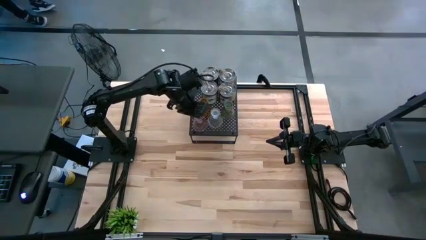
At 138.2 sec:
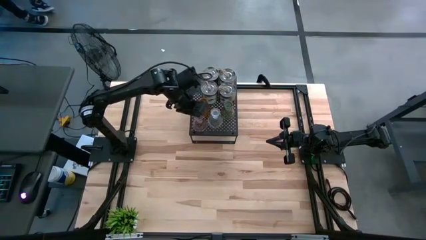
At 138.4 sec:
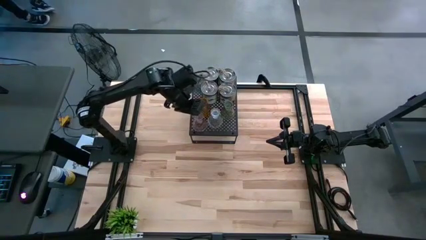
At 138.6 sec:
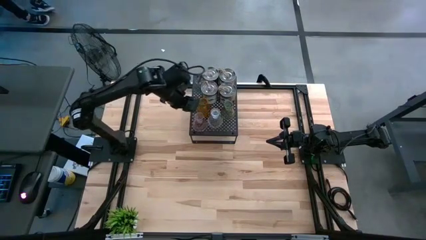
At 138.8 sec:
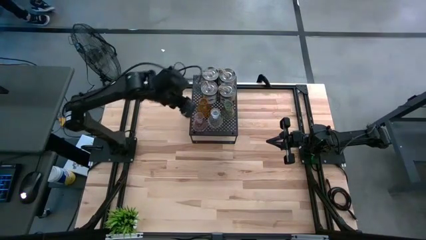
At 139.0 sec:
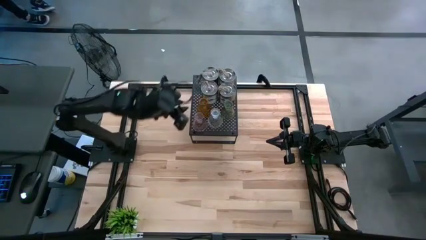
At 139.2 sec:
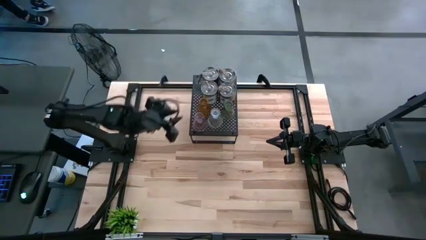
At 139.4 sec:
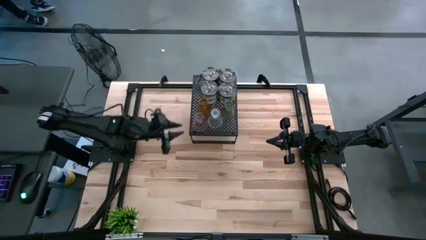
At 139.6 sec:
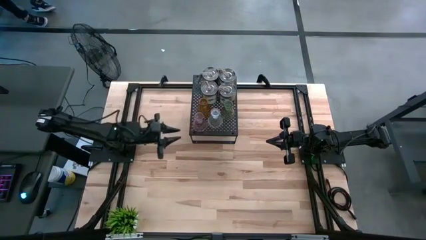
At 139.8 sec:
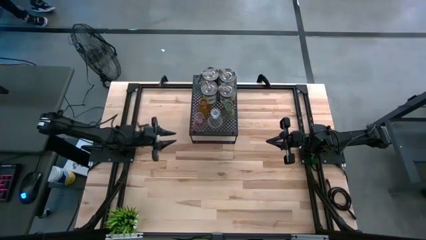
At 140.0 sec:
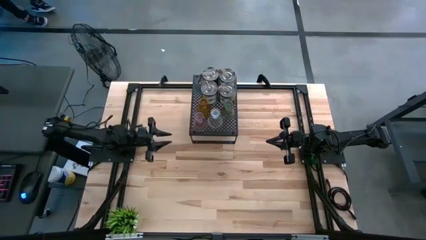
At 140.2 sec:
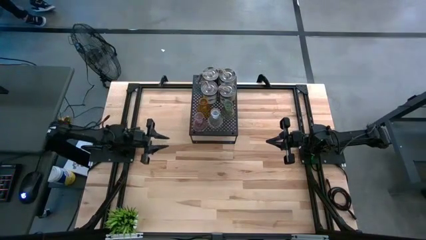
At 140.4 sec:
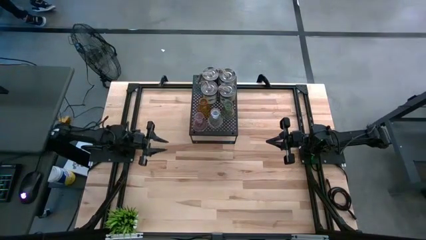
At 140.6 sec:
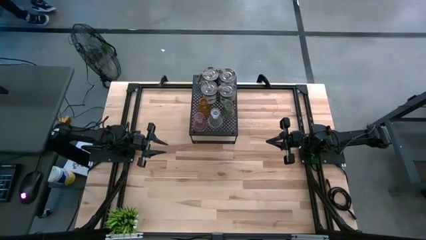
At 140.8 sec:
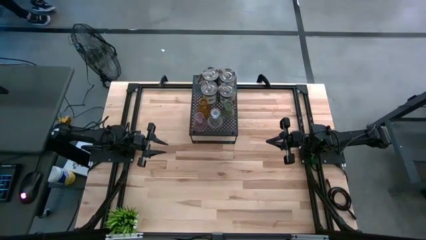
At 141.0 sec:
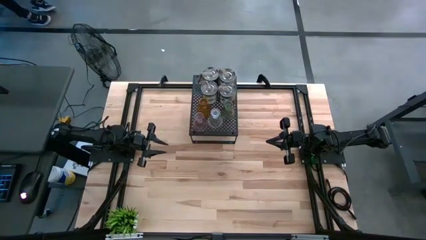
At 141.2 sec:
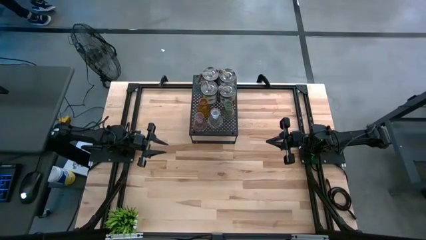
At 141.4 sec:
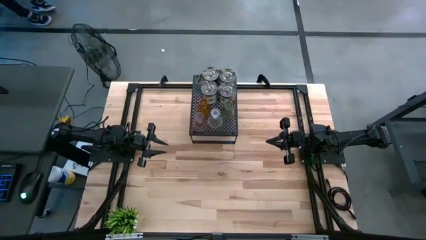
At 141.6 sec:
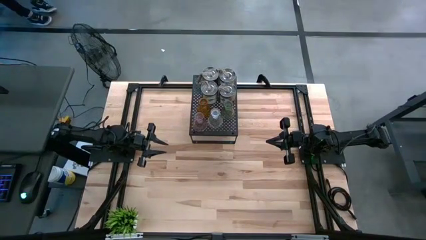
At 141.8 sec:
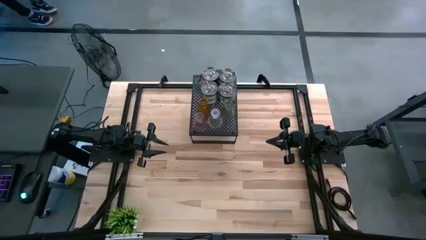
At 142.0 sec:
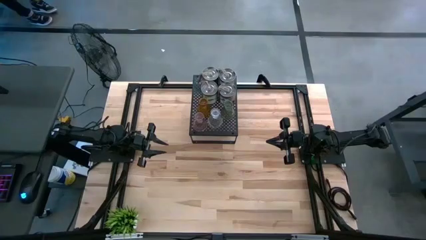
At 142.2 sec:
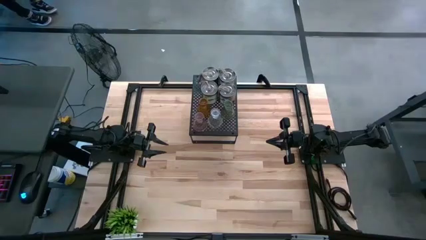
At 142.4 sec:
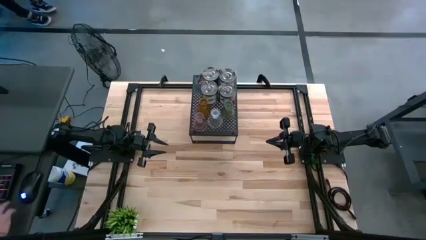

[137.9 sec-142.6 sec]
Task: Pick & Place candle stick holders
Return to Home Position

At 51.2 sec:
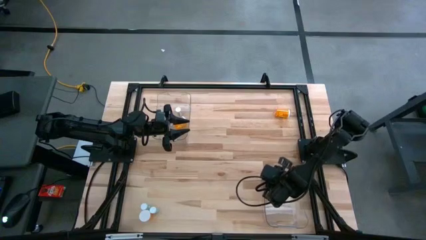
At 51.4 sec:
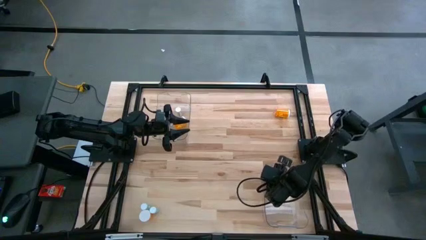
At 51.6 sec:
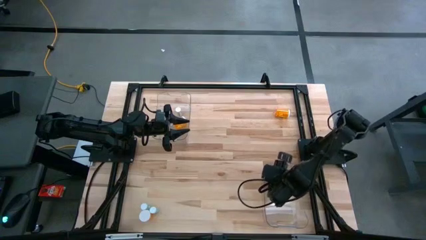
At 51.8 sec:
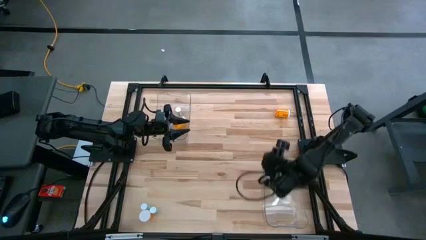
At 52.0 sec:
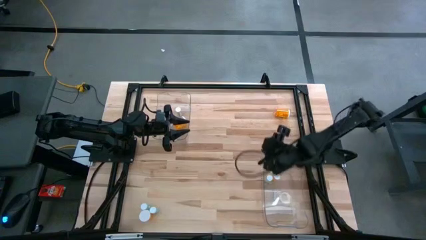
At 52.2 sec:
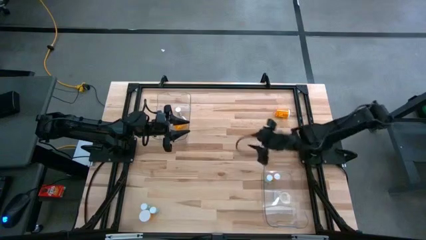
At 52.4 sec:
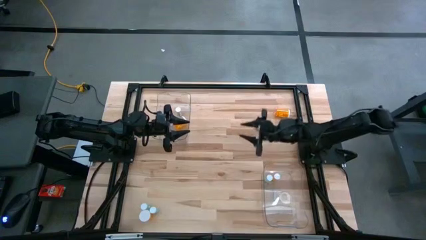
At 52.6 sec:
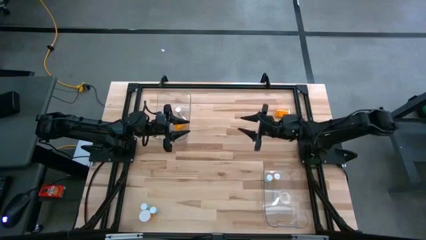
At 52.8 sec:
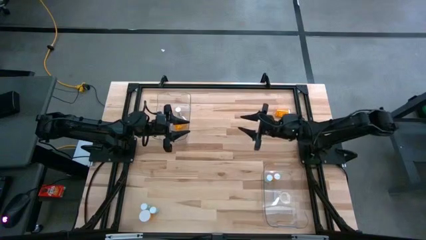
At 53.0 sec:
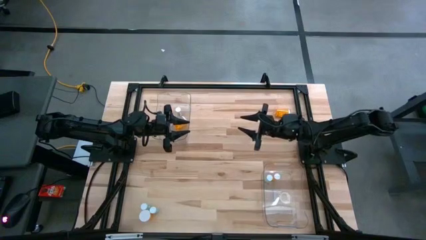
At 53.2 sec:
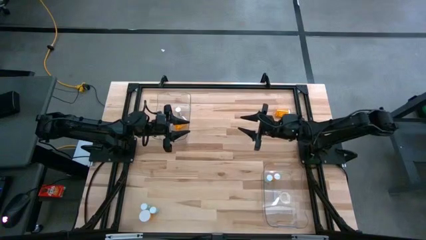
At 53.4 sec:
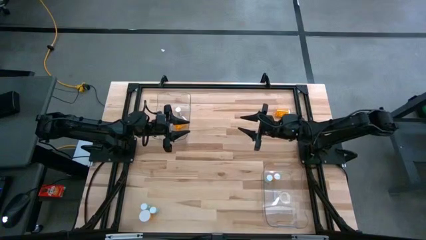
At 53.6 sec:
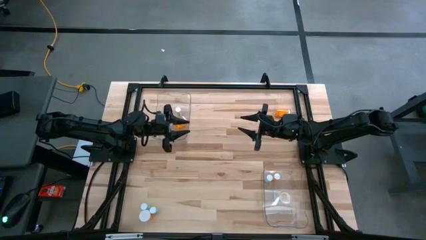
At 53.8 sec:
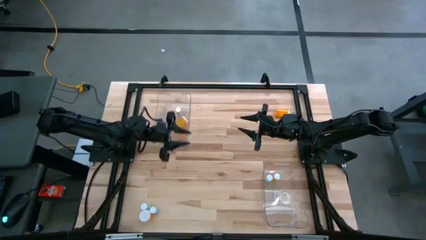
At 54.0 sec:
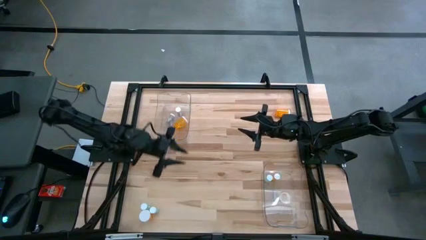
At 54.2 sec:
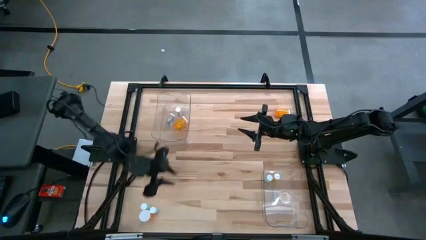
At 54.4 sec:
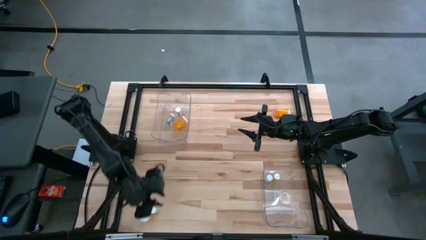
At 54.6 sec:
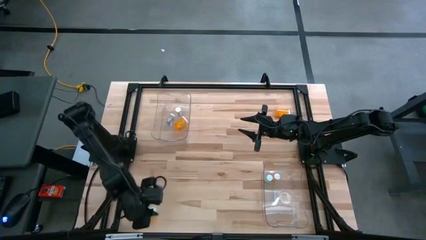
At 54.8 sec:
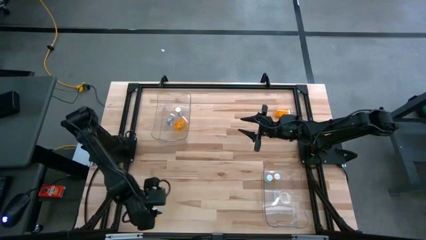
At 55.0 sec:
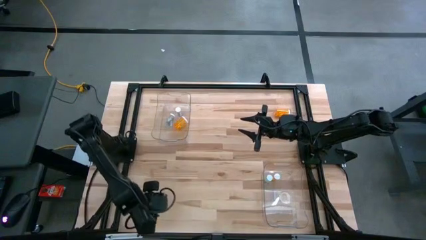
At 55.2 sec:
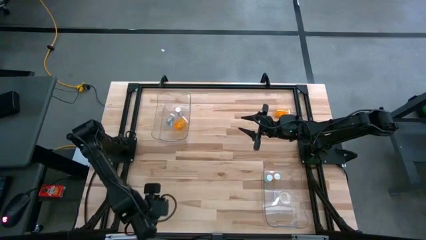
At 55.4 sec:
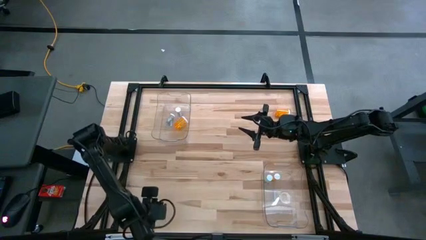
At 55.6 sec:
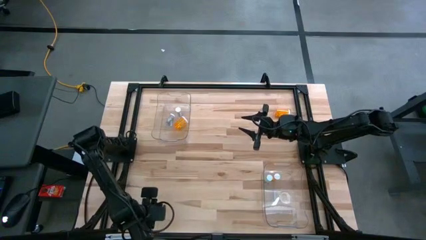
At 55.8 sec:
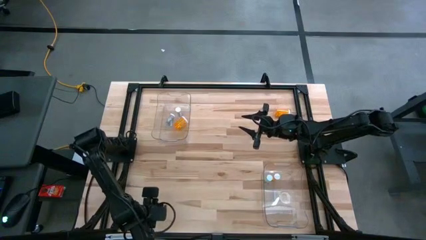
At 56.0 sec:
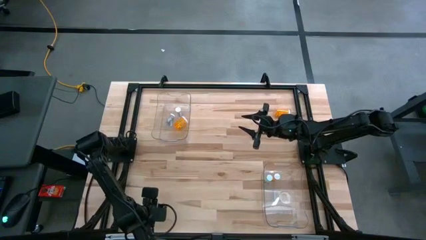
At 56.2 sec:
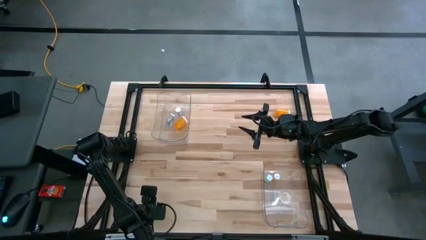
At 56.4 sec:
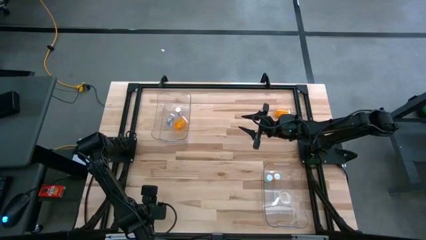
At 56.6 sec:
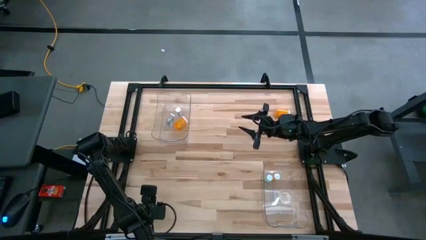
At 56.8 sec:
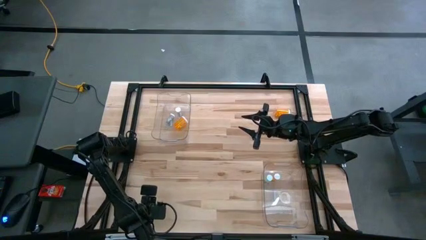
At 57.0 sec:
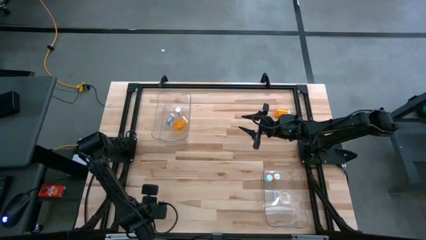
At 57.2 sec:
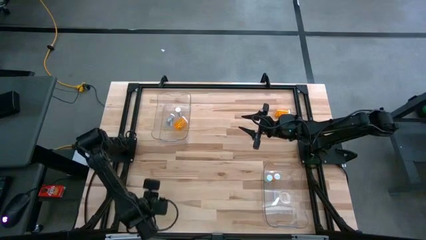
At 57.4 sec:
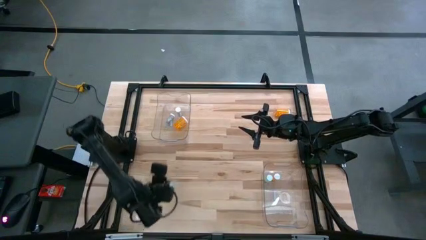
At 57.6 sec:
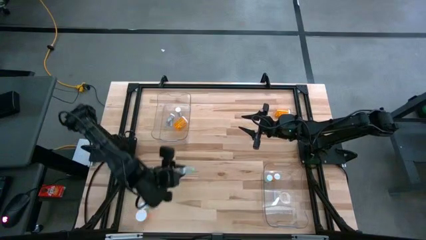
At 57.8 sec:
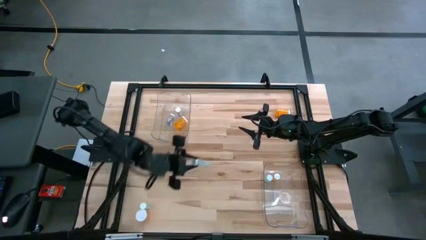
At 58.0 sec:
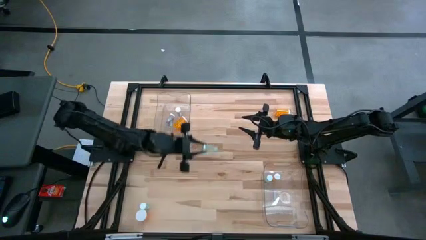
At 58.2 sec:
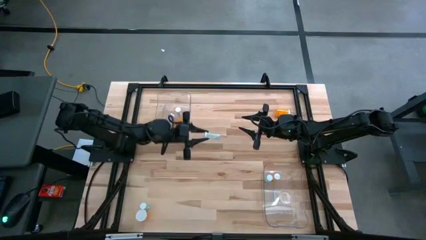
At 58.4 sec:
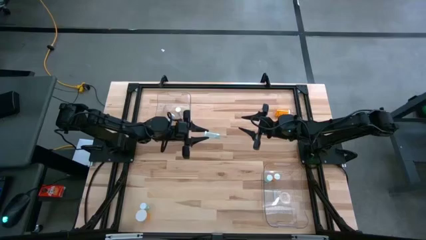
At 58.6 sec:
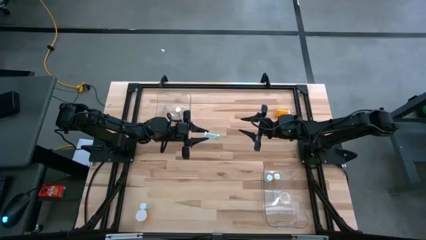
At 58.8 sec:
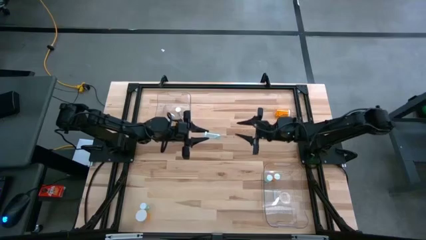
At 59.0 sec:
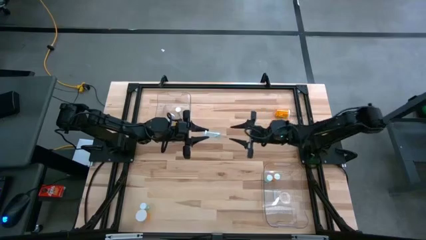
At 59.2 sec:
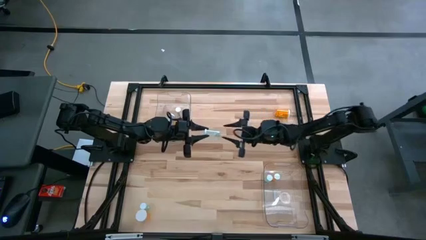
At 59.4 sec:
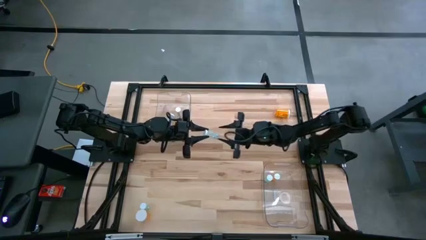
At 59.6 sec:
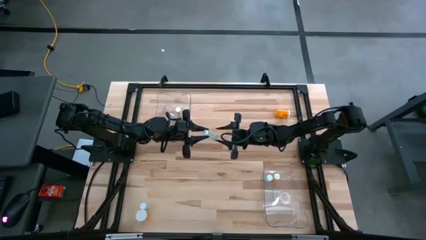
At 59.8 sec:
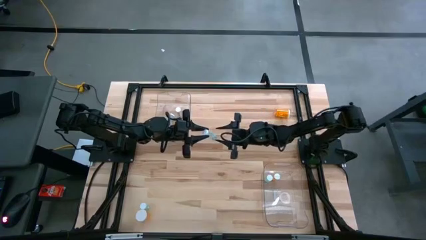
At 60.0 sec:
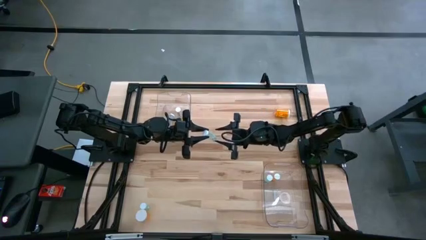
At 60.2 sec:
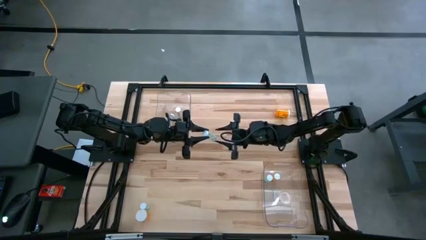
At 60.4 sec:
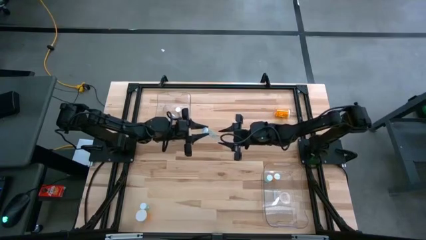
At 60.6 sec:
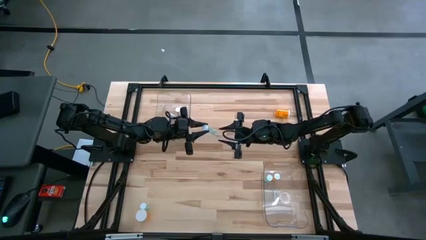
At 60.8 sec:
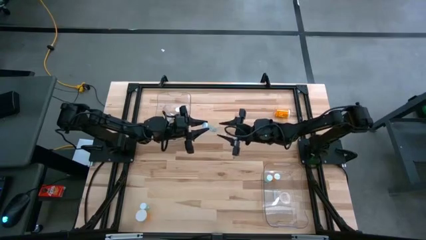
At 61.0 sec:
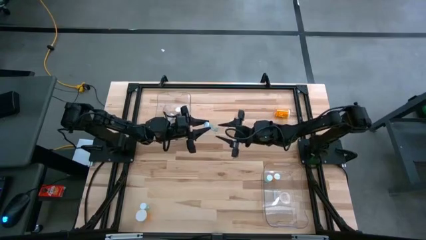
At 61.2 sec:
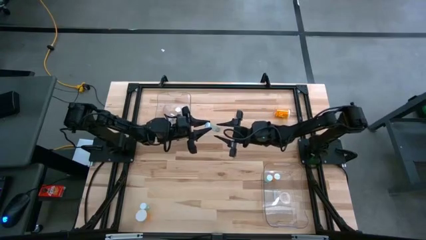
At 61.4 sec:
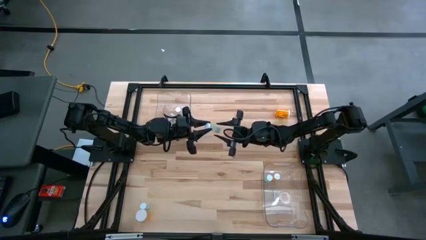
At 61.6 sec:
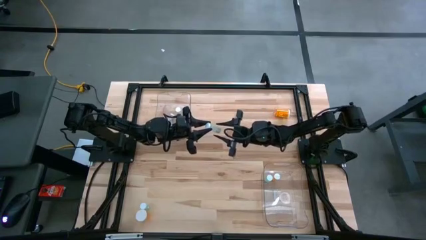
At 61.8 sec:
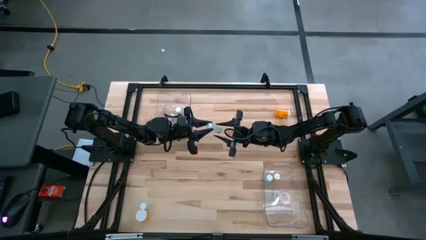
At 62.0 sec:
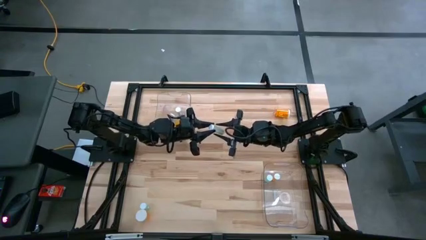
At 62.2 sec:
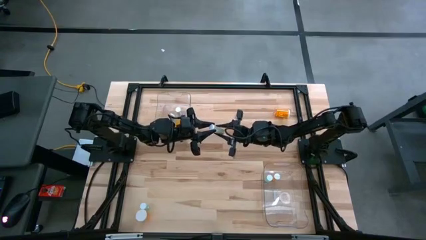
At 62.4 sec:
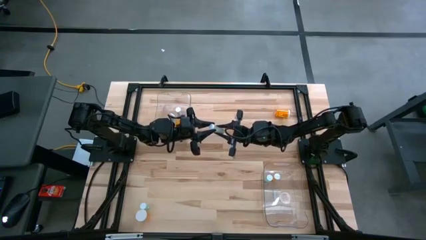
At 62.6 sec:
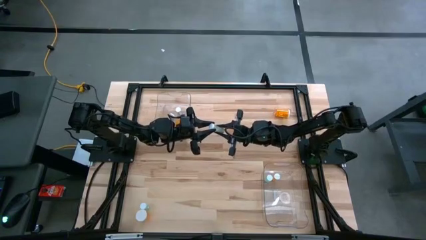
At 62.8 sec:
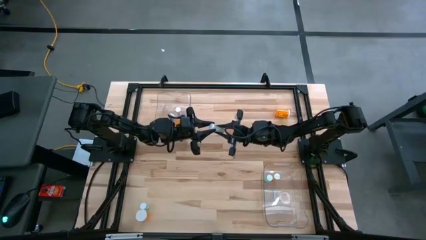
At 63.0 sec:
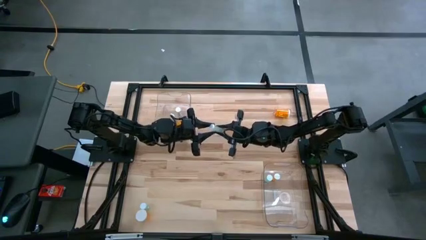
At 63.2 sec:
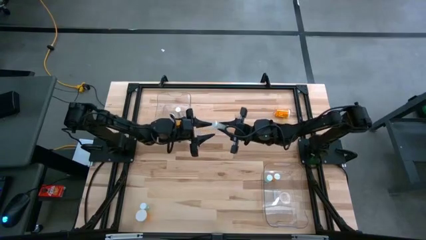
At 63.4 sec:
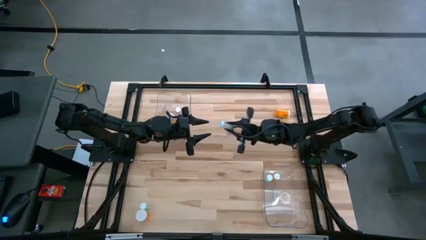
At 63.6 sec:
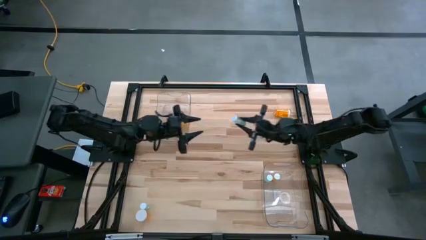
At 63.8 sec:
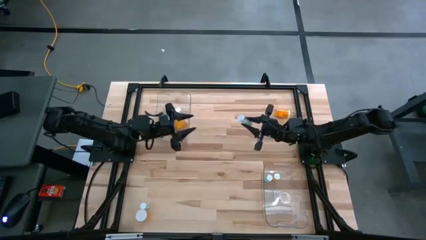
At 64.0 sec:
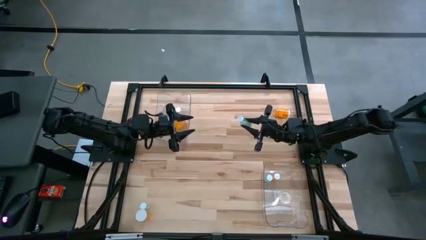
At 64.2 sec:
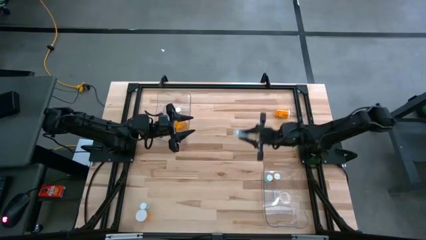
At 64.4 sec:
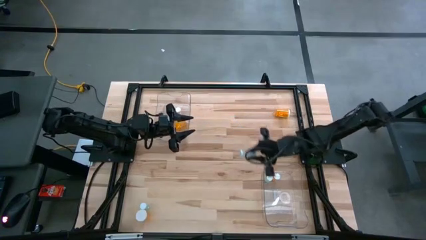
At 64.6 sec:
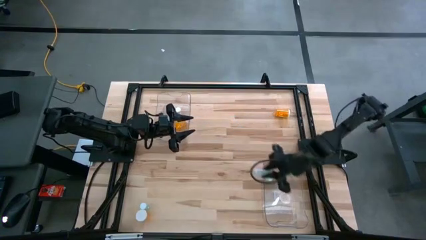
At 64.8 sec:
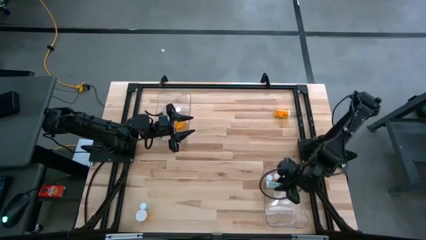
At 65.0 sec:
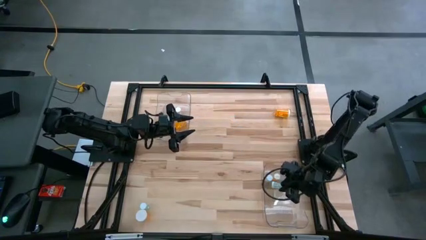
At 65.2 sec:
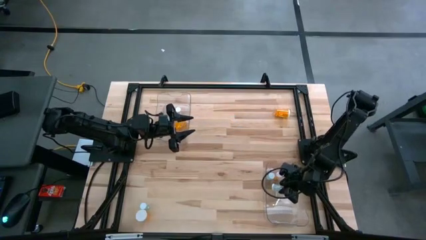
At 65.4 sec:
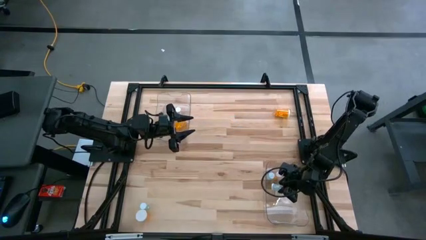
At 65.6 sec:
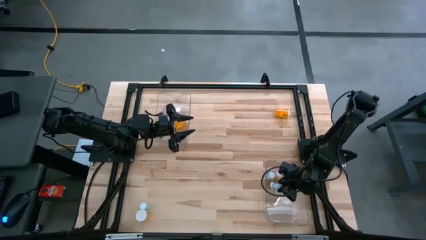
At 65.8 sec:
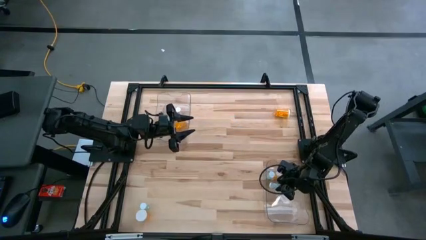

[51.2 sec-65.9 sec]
Task: Pick and place medicine bottles into bin by pill shape (circle, oval)
Put the blue tablet bottle into the right transparent bin
